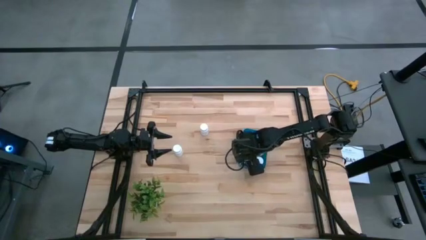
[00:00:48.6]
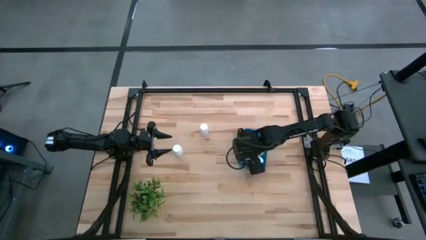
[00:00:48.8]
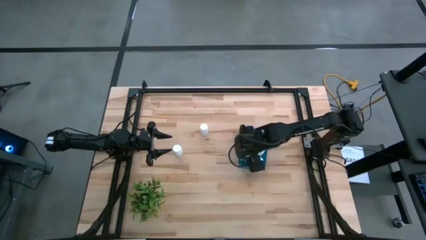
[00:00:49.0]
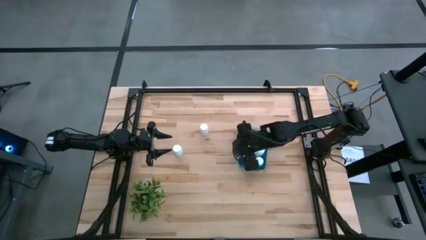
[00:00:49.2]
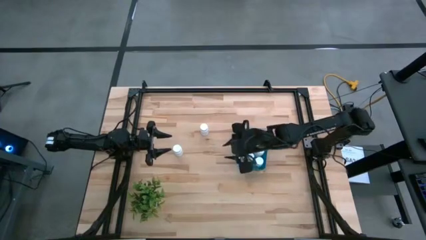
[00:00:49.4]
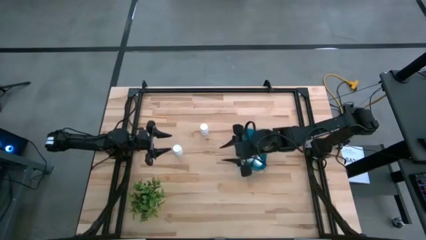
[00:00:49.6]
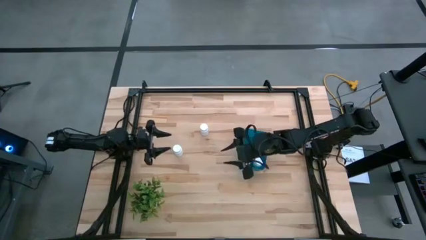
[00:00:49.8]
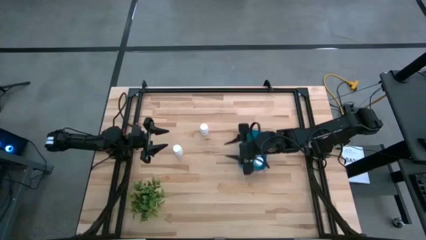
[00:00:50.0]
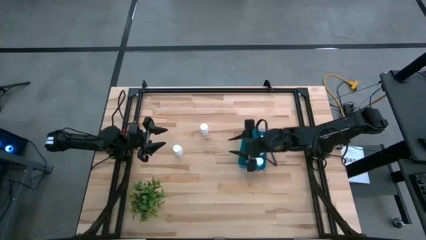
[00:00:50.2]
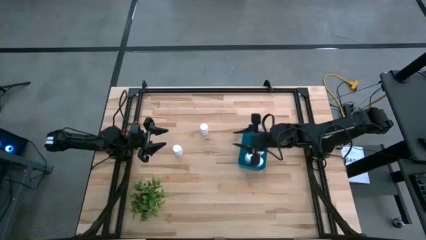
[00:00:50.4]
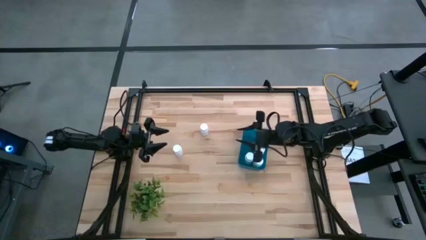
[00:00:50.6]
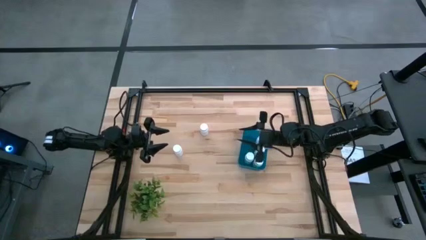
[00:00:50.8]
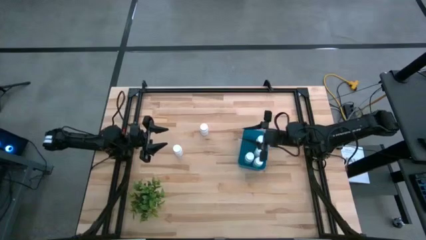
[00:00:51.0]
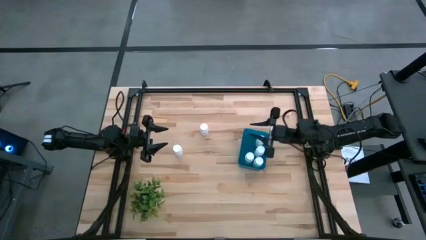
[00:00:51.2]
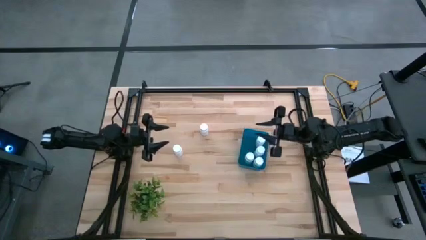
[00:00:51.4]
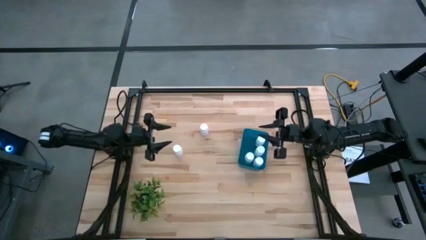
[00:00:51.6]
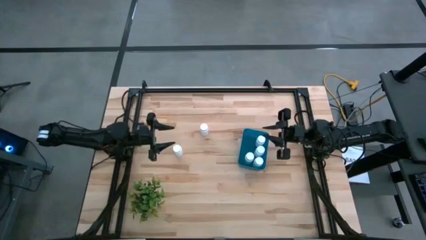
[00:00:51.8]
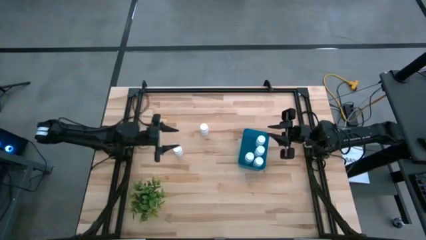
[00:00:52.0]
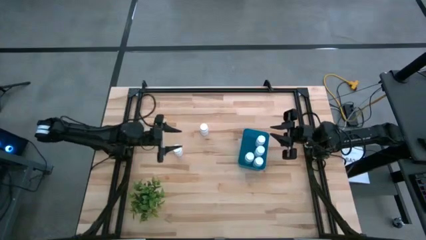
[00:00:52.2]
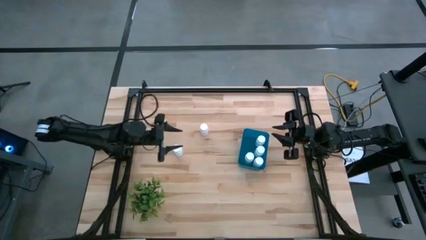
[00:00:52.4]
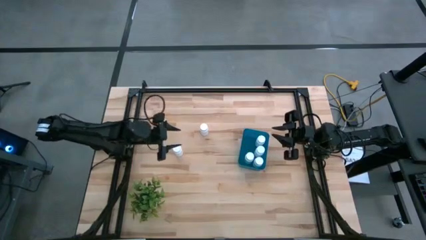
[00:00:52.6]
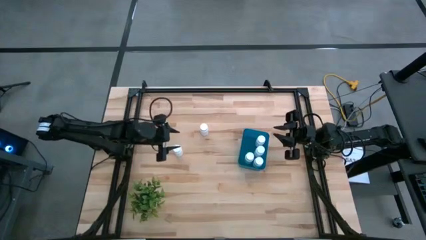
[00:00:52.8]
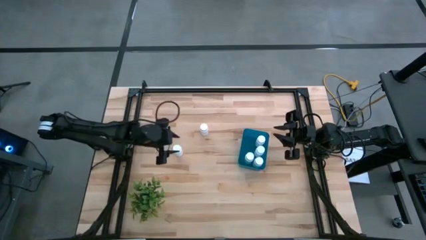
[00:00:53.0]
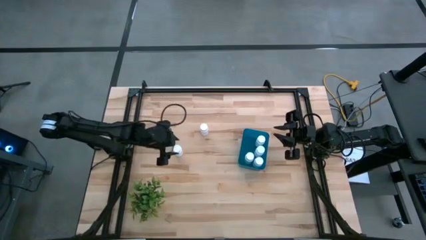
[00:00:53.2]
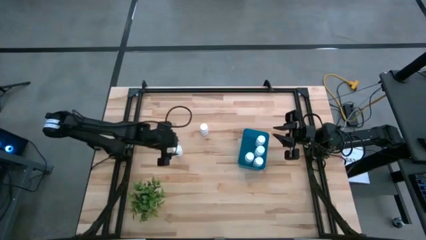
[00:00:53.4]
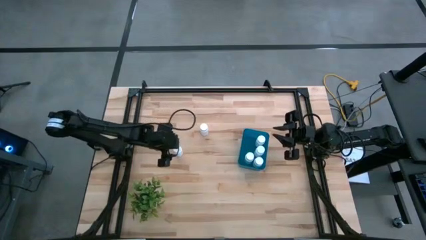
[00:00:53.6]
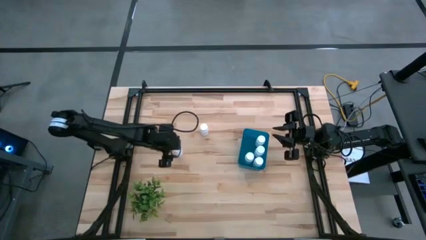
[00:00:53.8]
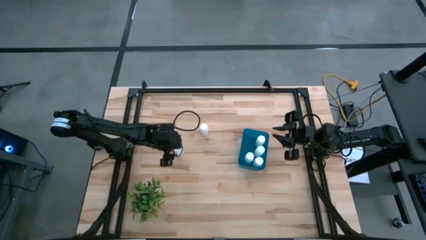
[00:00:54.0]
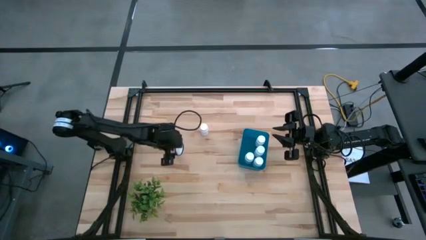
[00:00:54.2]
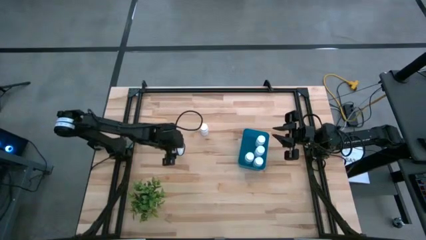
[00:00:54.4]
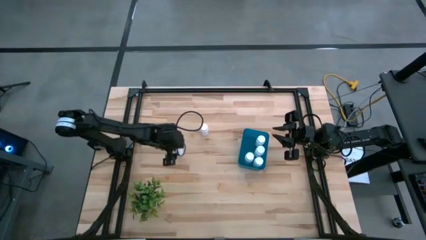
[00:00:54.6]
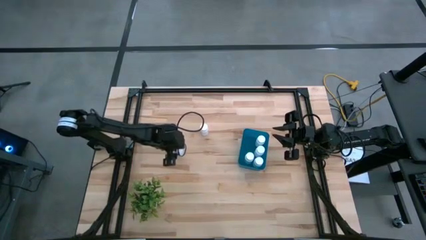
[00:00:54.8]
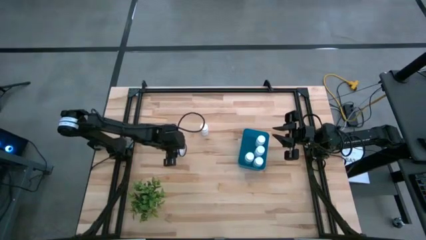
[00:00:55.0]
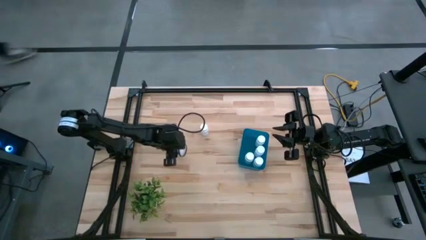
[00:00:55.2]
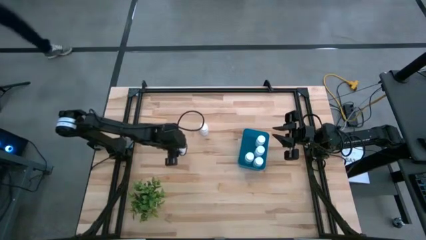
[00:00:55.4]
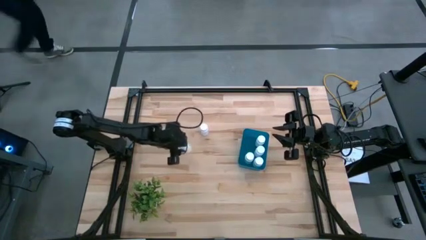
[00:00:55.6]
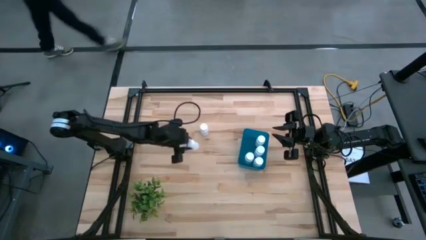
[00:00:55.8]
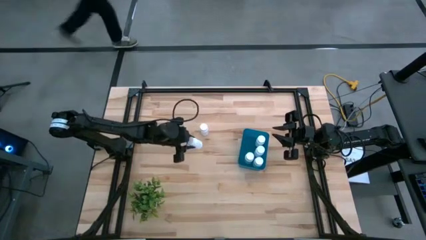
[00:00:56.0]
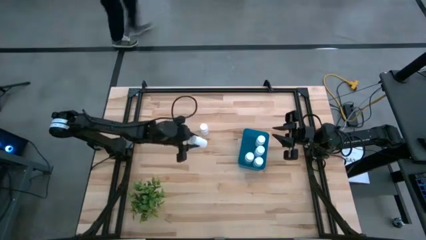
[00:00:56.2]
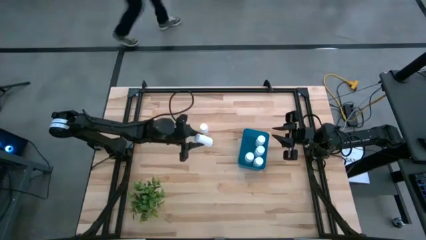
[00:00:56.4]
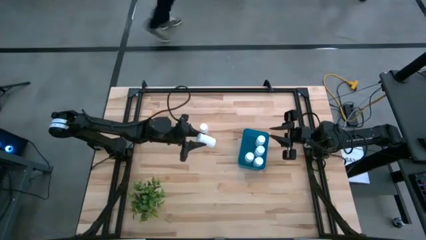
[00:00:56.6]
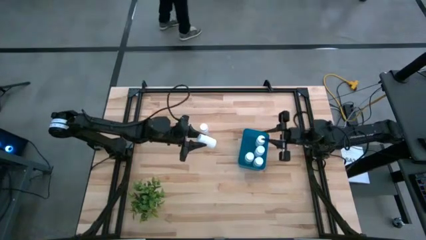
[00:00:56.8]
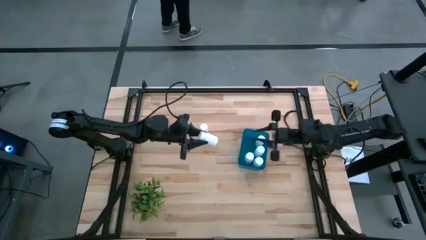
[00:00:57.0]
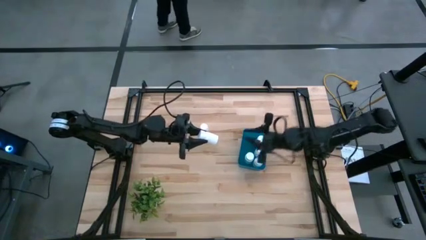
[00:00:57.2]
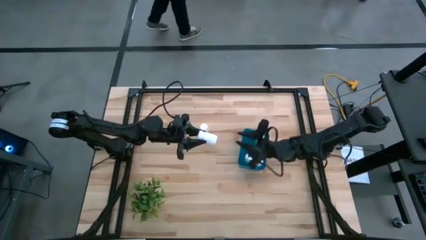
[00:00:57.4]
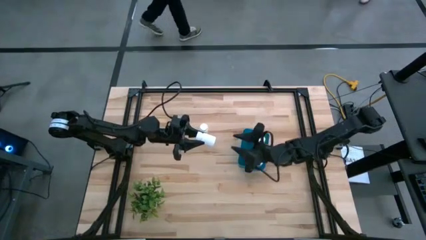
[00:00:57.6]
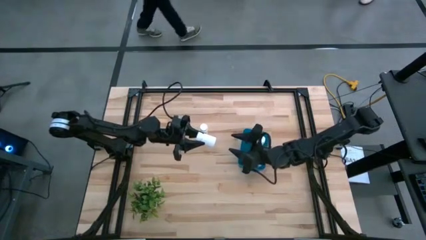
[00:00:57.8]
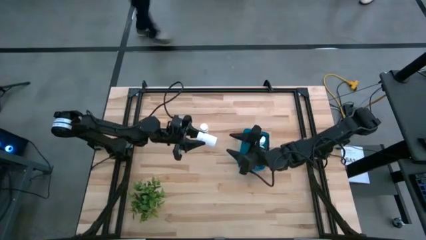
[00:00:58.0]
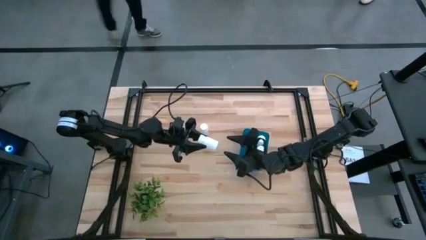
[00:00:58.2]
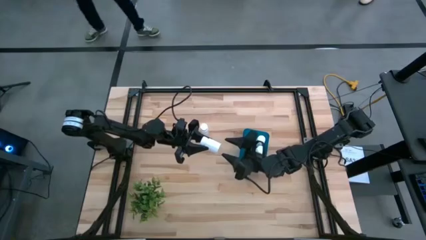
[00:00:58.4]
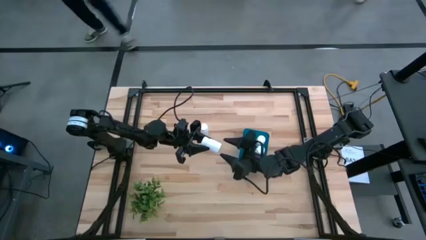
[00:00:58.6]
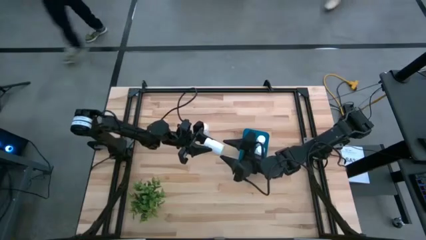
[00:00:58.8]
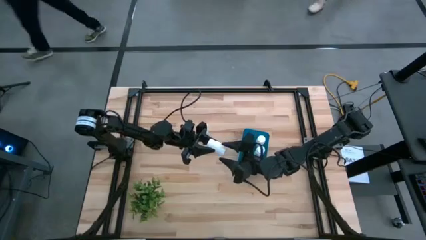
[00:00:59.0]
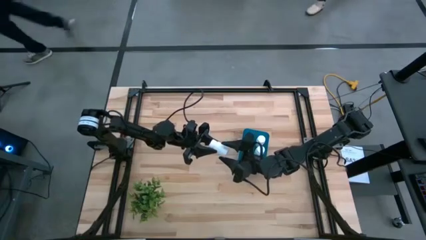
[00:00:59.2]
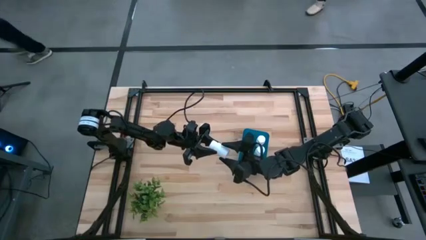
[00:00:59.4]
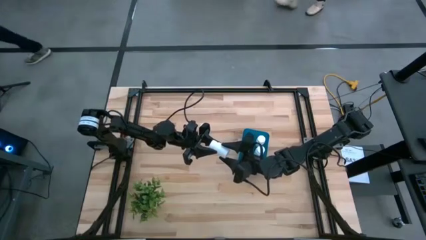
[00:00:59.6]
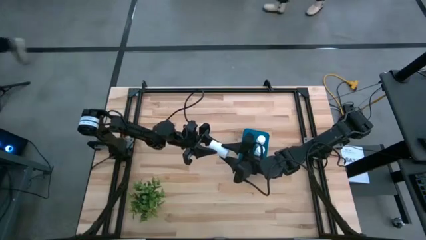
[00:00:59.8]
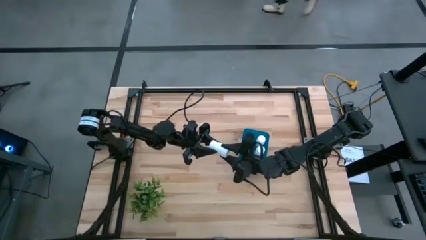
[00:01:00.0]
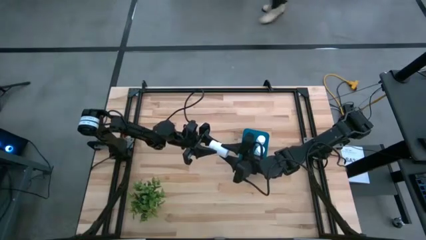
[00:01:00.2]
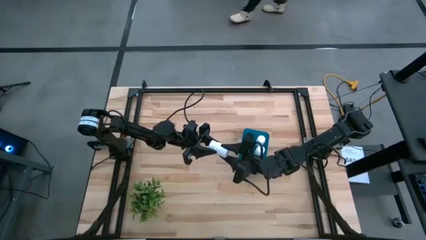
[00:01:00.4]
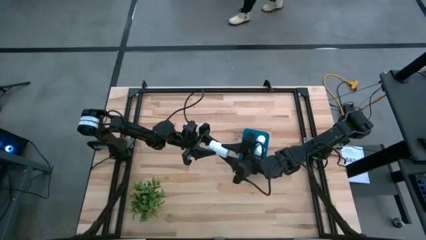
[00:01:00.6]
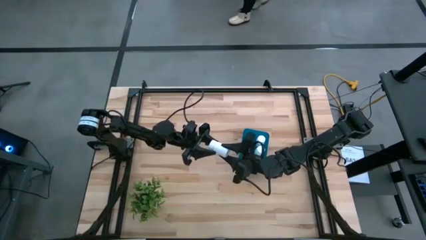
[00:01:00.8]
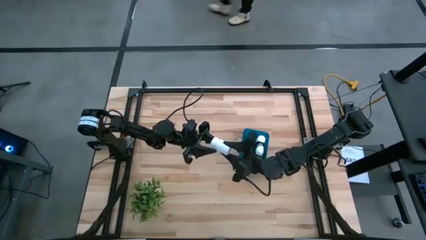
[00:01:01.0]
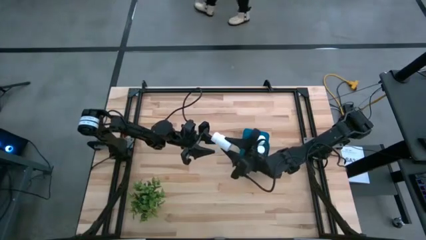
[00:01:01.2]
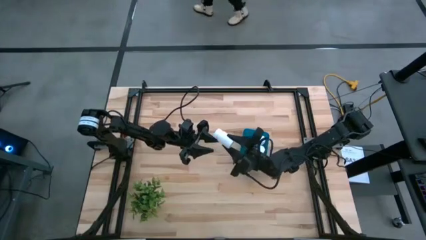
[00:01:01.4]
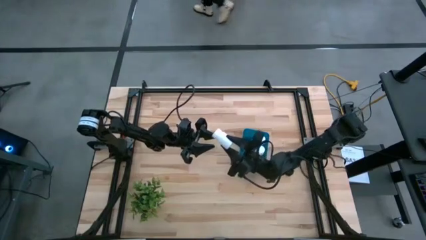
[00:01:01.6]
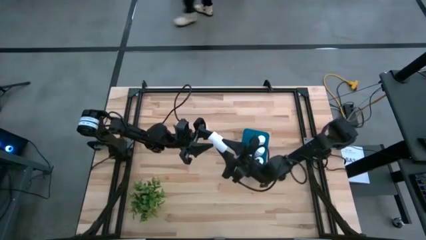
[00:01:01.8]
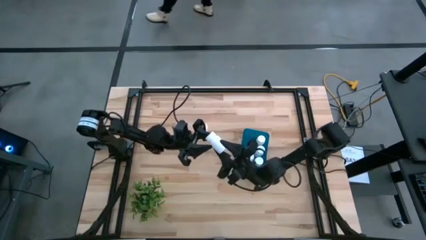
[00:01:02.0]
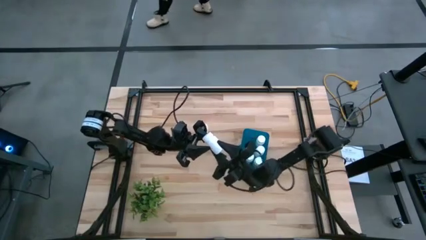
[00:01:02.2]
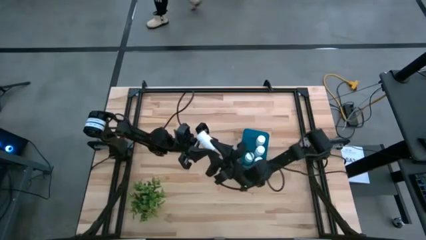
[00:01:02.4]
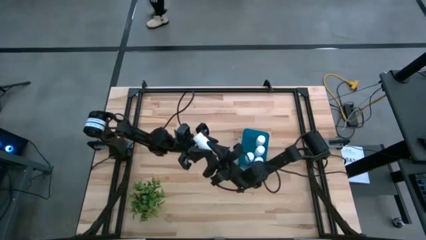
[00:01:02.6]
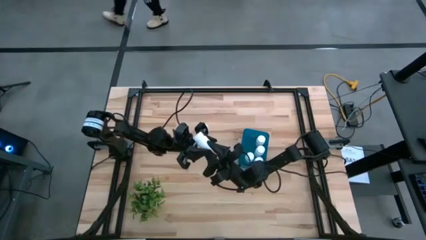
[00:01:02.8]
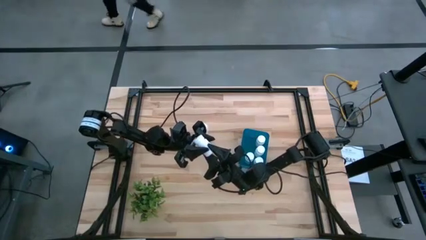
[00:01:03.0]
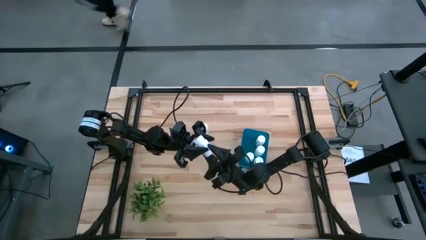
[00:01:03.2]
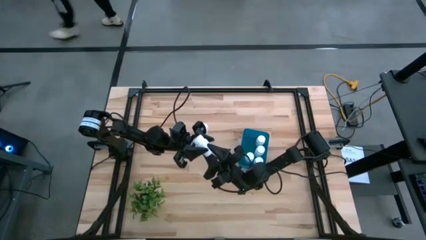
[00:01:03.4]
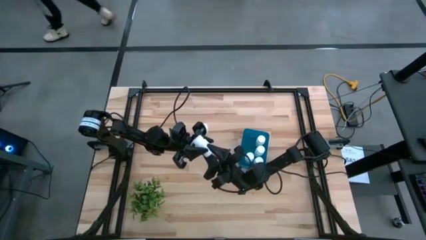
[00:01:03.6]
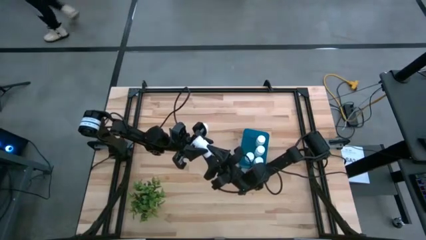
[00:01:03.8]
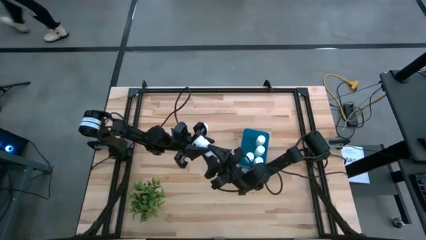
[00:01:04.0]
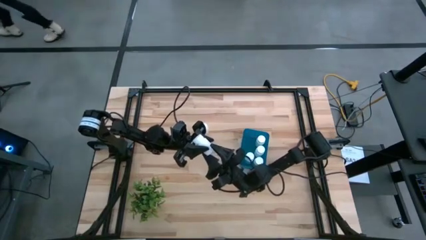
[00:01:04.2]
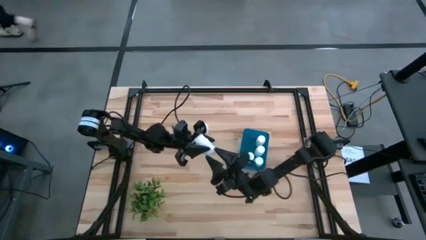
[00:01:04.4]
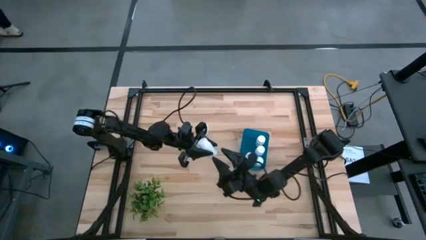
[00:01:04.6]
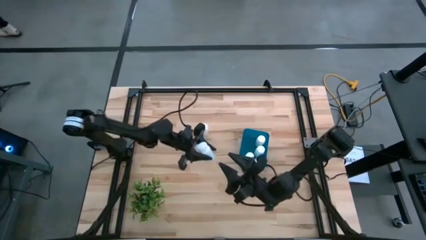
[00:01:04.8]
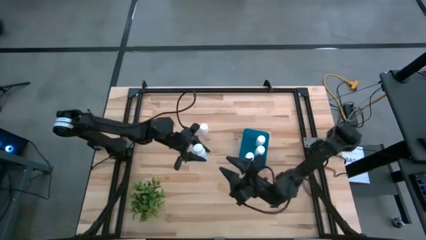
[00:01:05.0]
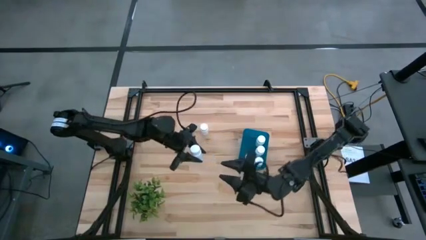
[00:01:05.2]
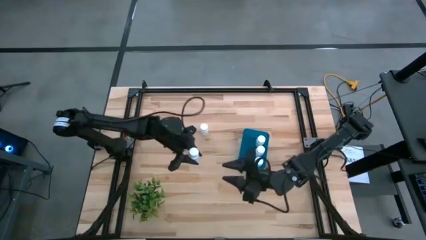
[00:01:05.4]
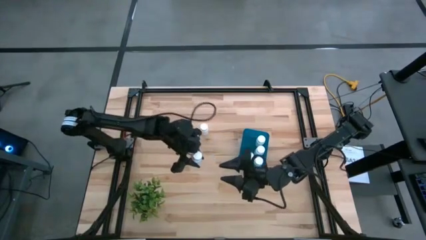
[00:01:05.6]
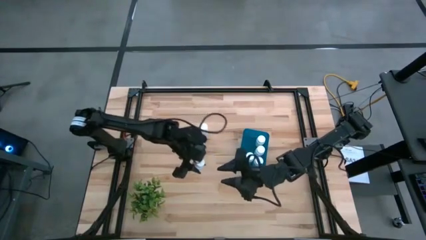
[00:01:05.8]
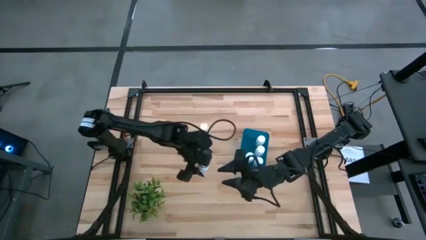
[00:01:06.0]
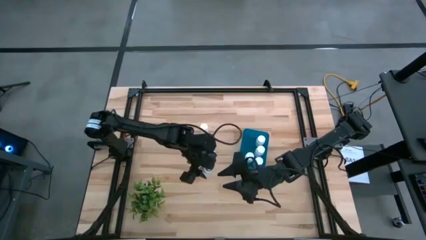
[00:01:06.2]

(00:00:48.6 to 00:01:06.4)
Task: Pick and place pill bottles into a basket
Put the white medicine bottle into the blue bin
